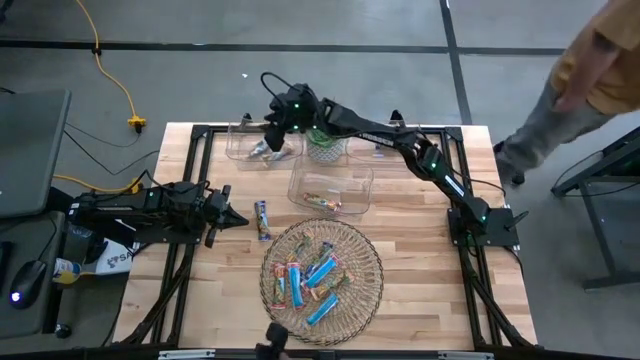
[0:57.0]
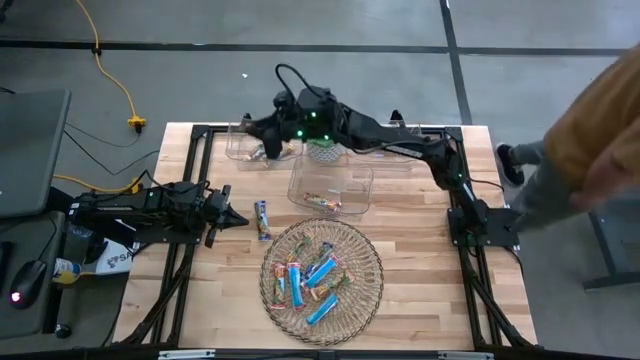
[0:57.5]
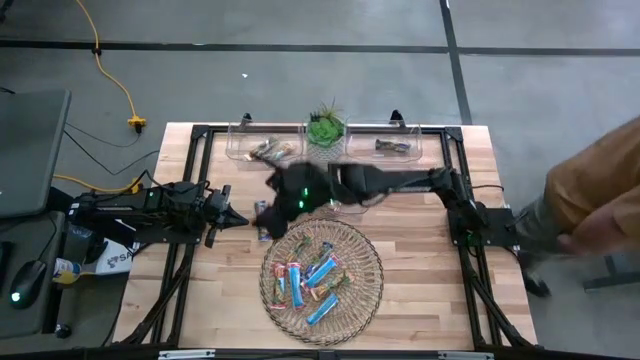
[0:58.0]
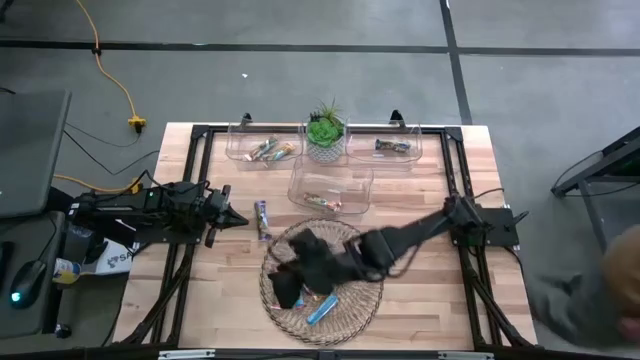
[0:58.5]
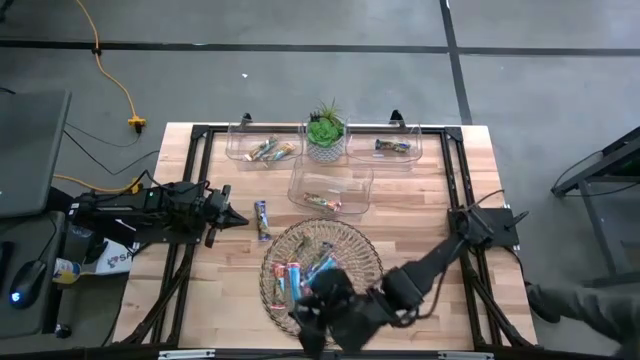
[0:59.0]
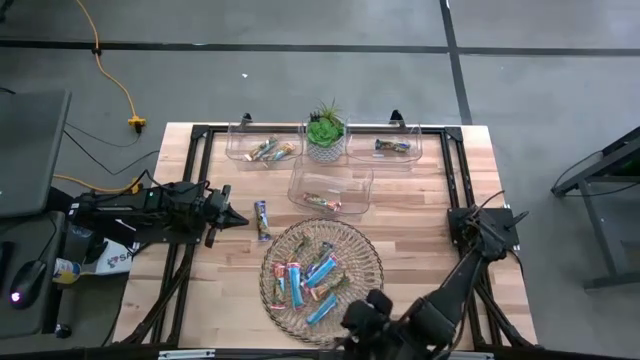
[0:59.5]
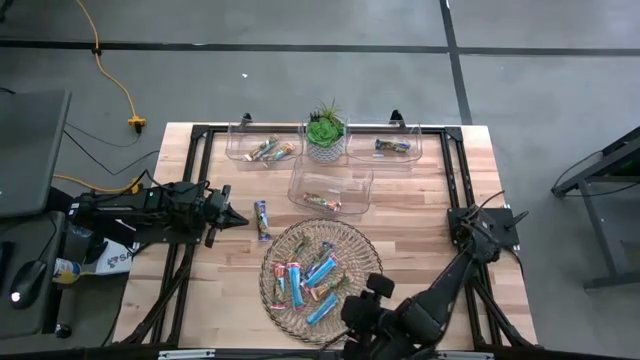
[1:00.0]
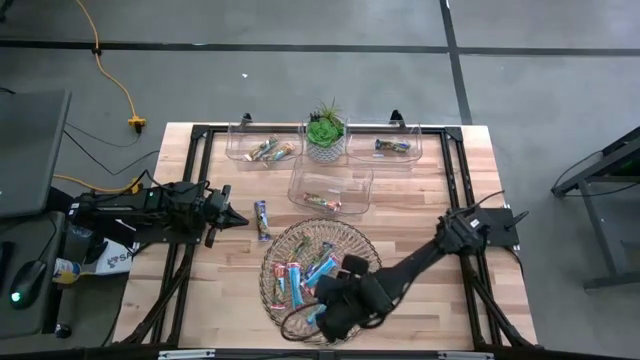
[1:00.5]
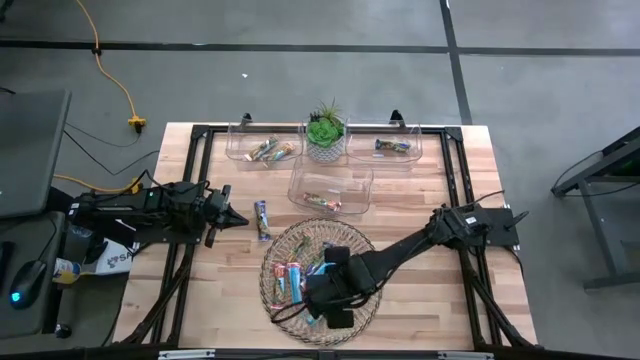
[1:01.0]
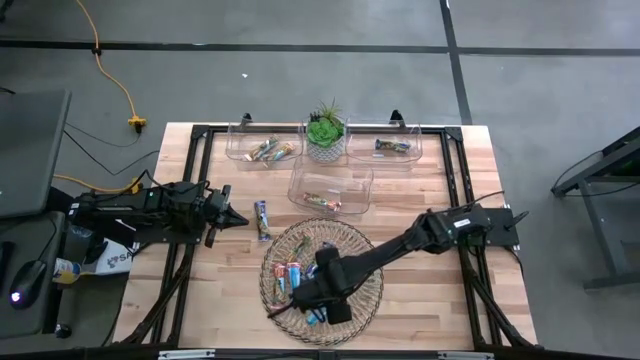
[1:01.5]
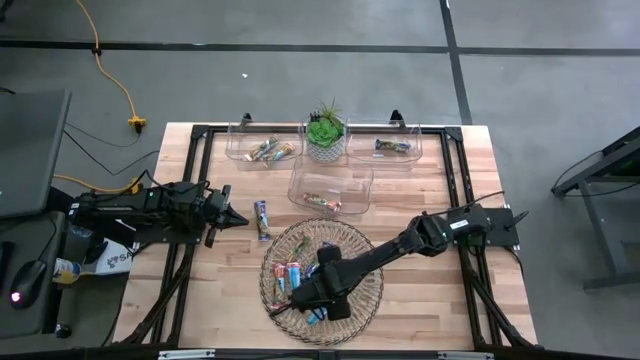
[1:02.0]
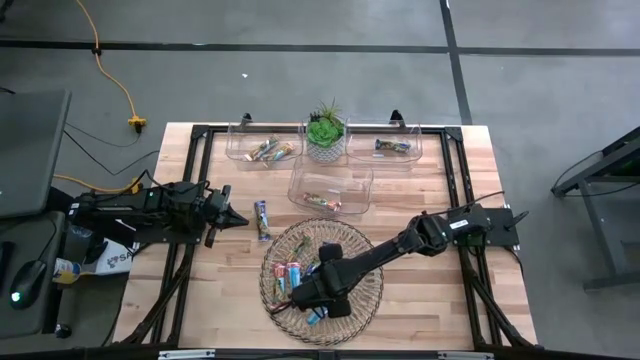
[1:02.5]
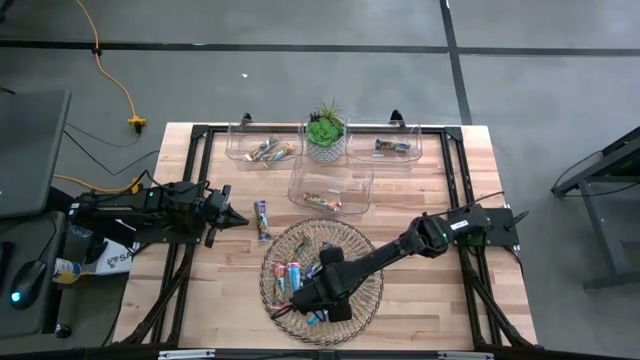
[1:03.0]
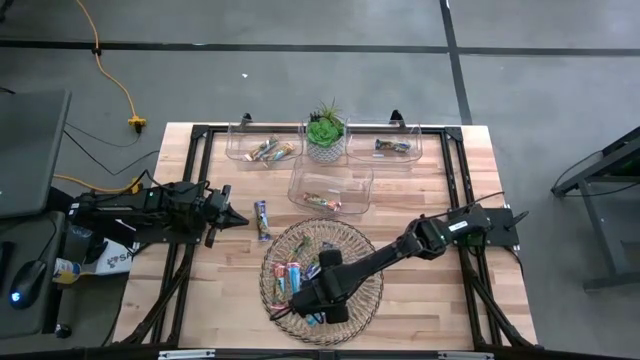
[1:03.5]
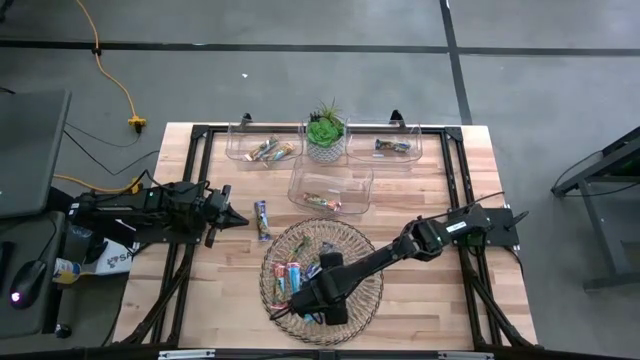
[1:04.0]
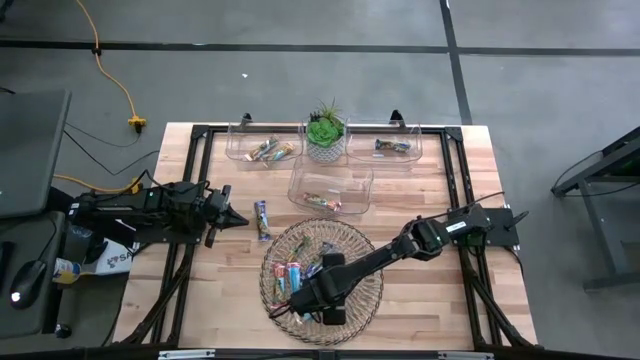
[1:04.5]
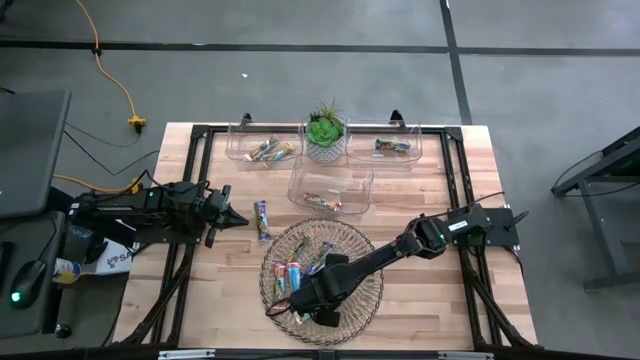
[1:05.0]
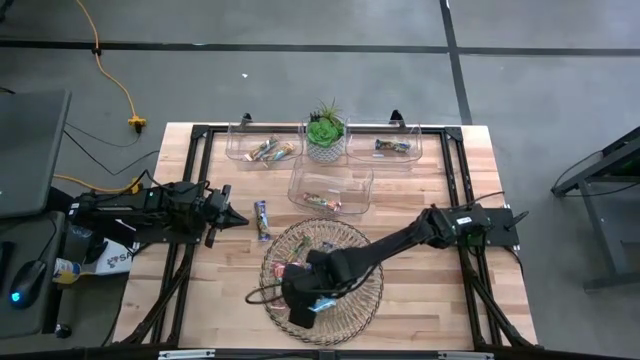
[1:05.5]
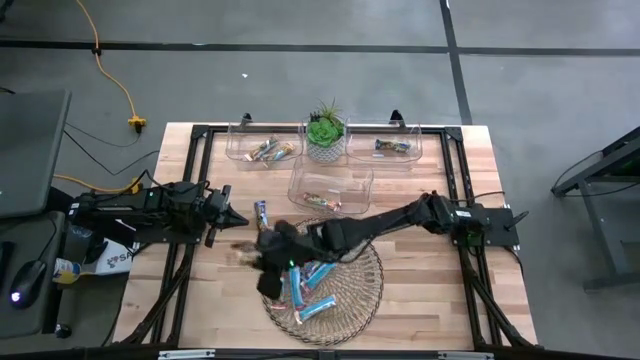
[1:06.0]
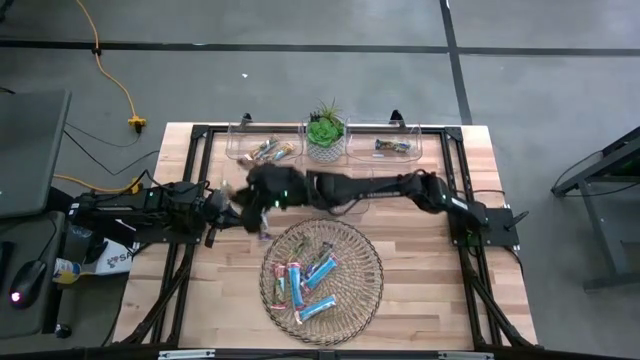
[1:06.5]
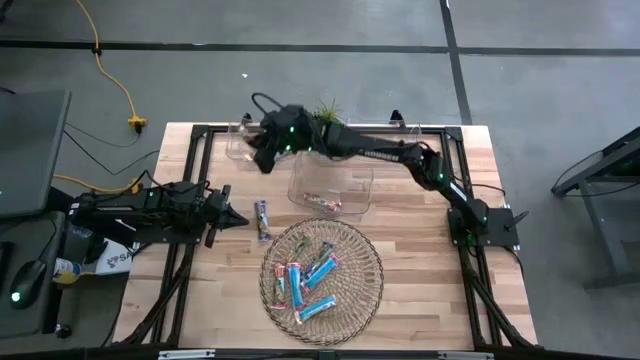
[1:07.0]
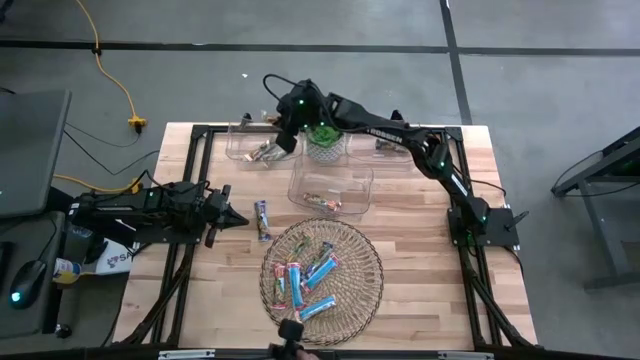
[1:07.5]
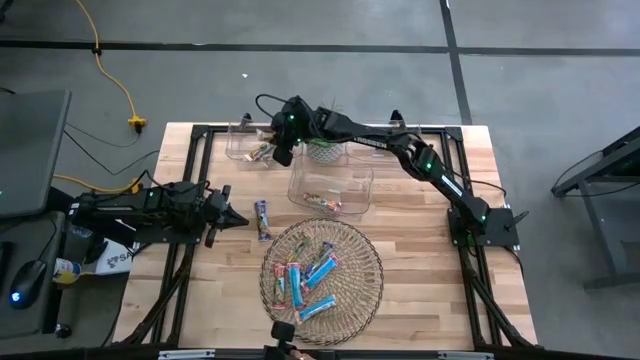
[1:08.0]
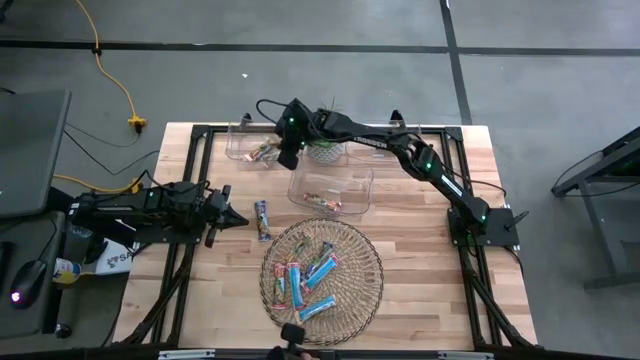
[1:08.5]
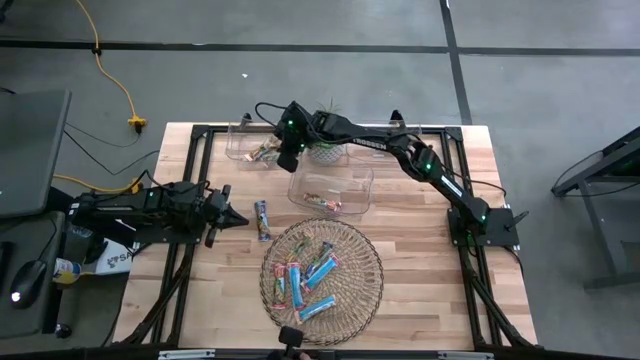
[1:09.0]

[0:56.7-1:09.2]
Task: Pick and place Granola Bars by type
Put the yellow granola bar into the top left transparent bin

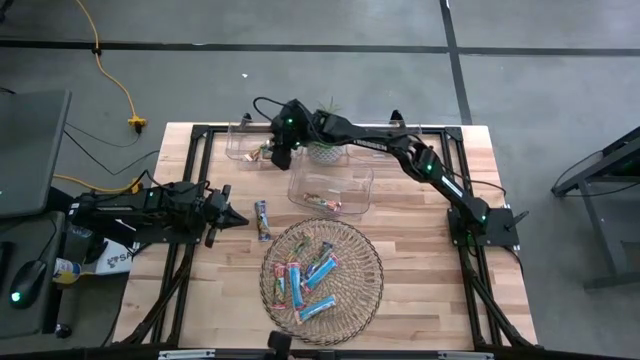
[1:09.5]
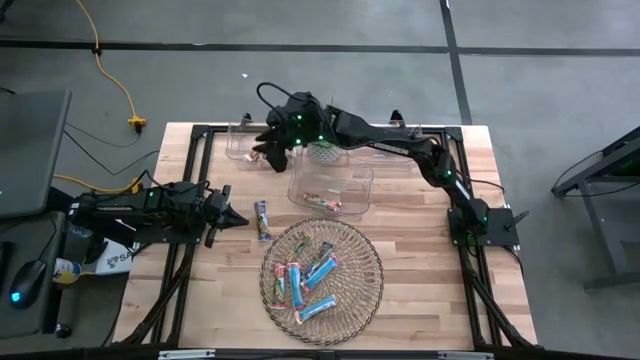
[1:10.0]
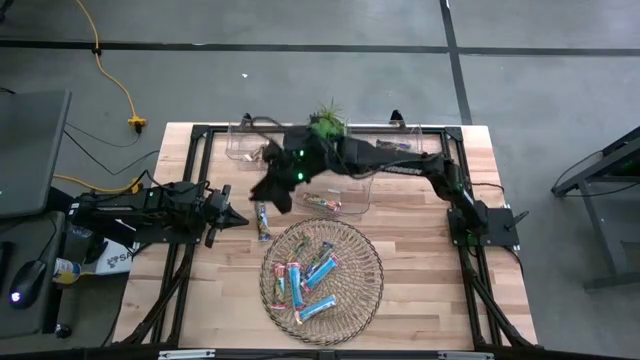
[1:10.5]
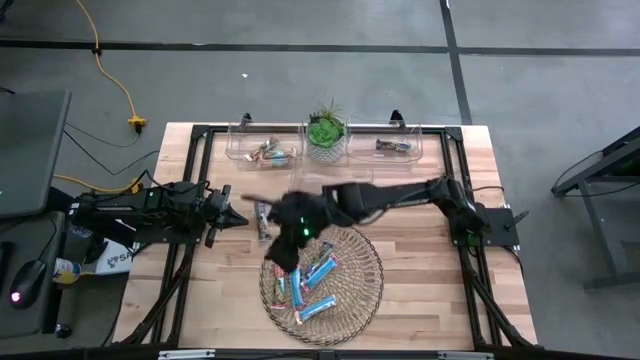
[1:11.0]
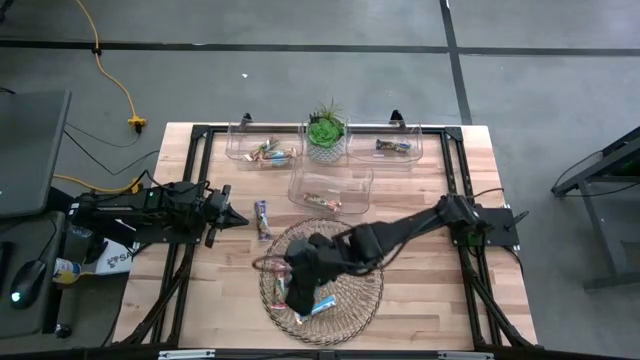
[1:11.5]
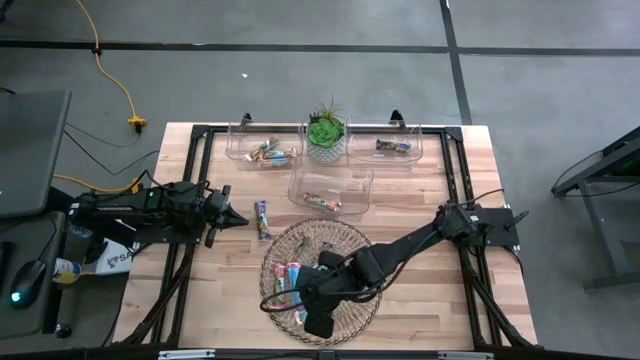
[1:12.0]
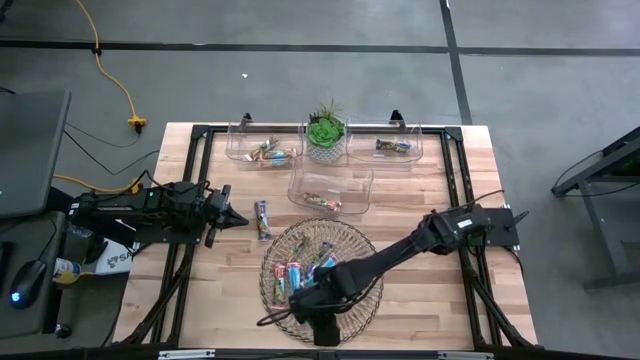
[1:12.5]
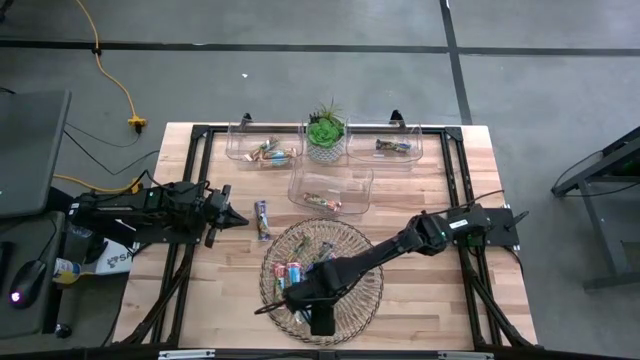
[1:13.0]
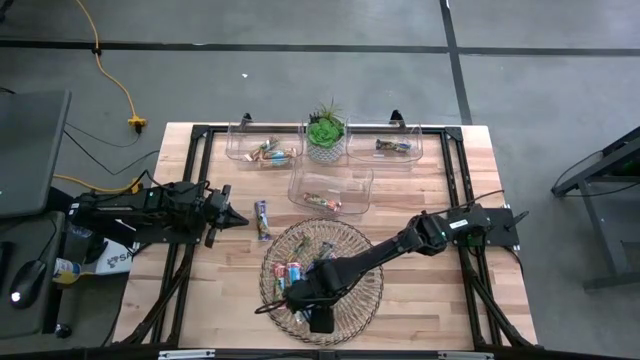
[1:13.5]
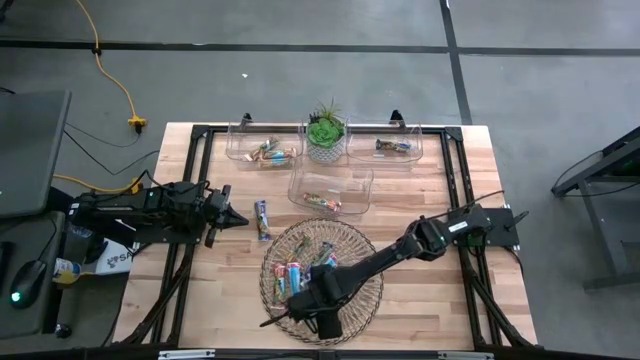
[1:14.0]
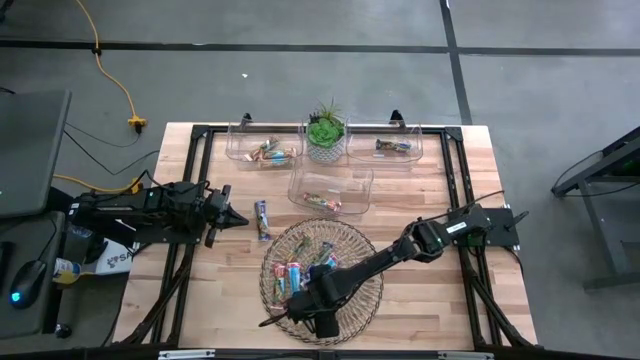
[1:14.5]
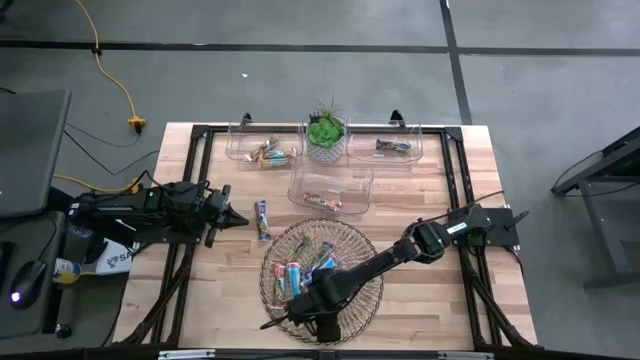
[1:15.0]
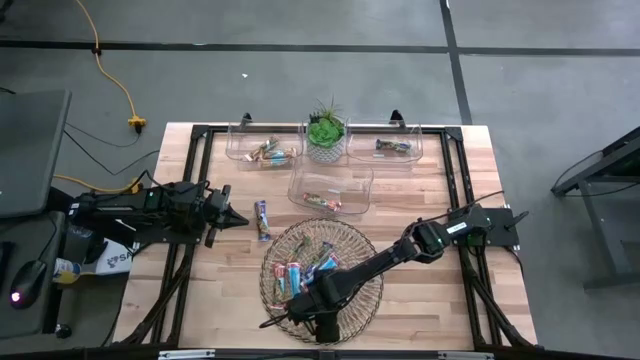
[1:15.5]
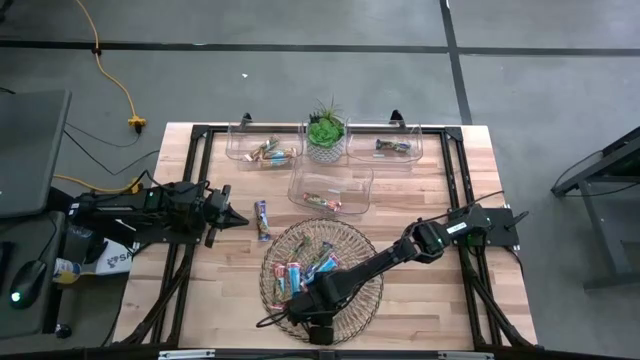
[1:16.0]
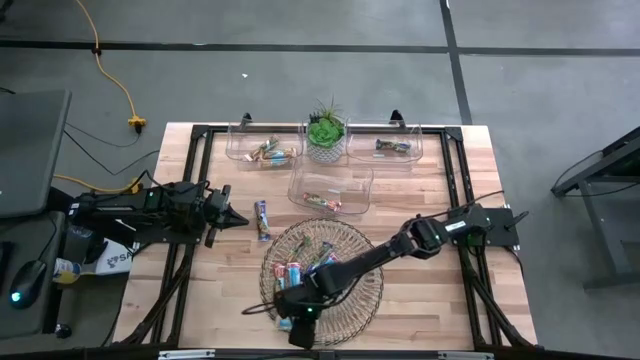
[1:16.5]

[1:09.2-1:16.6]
Put the yellow granola bar into the top left transparent bin
